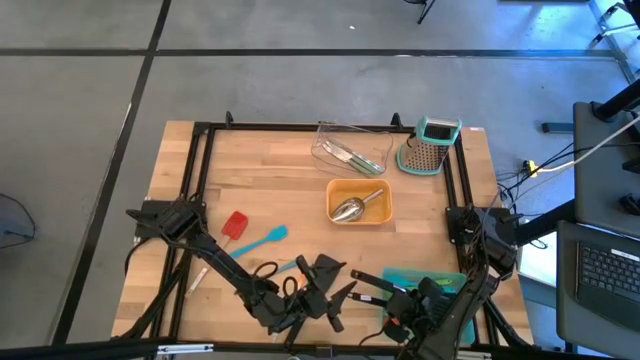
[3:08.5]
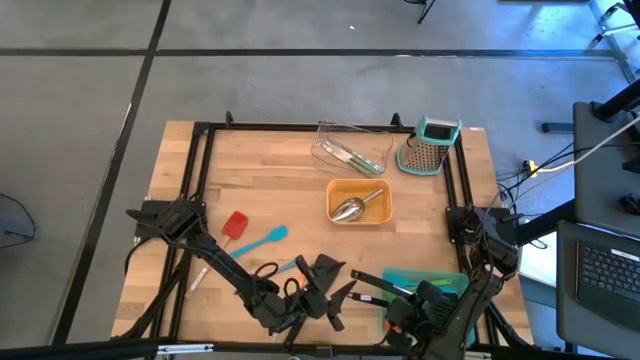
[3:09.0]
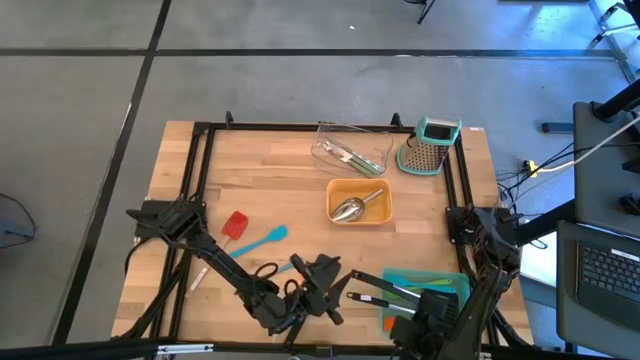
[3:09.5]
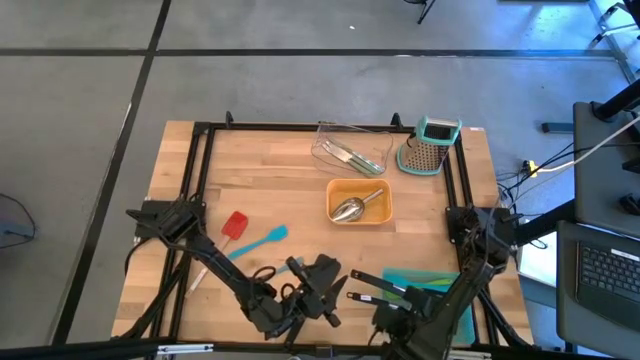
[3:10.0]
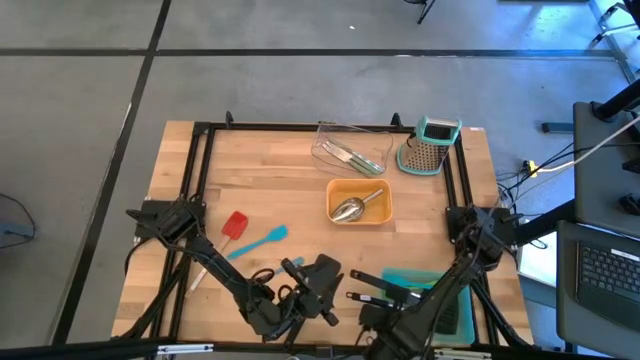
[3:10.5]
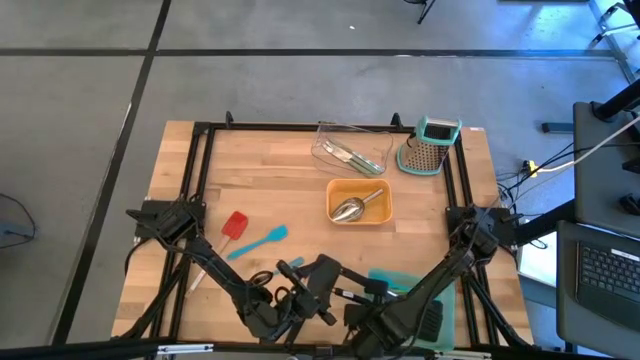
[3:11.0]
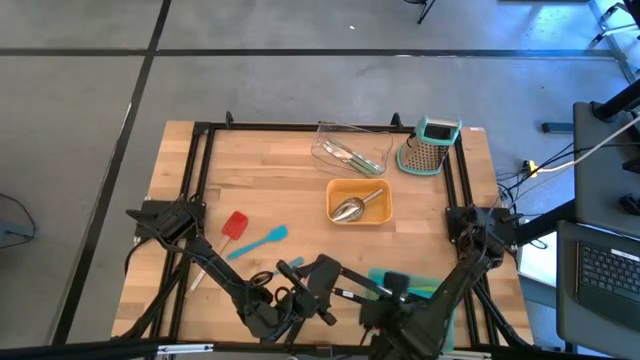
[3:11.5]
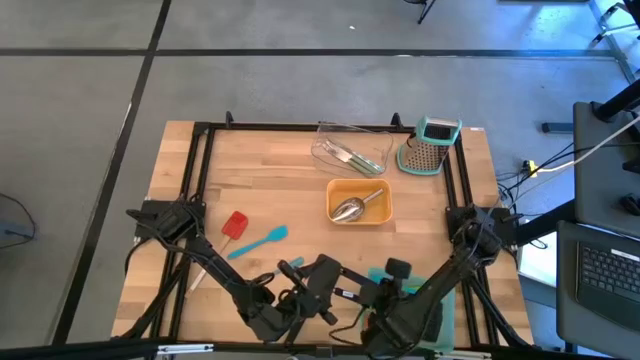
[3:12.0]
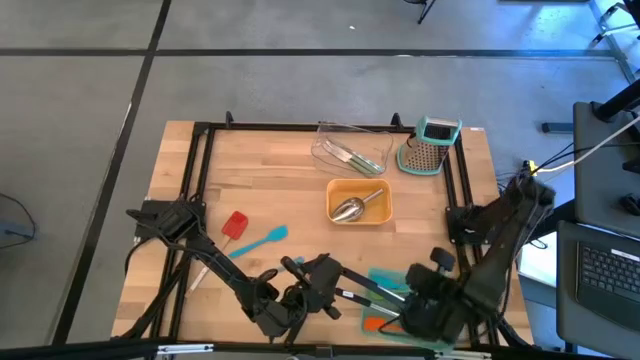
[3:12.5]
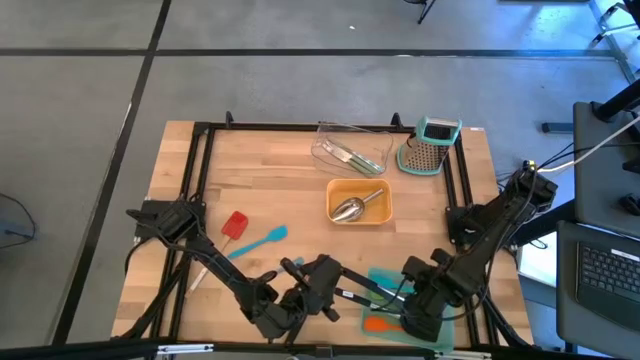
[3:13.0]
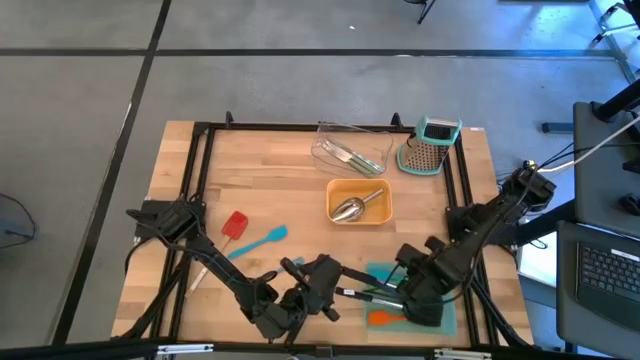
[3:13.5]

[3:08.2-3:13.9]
Task: Pick & Place Kitchen Items
Adjust the green bin

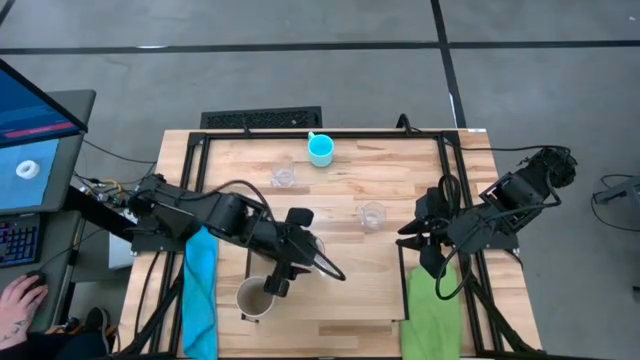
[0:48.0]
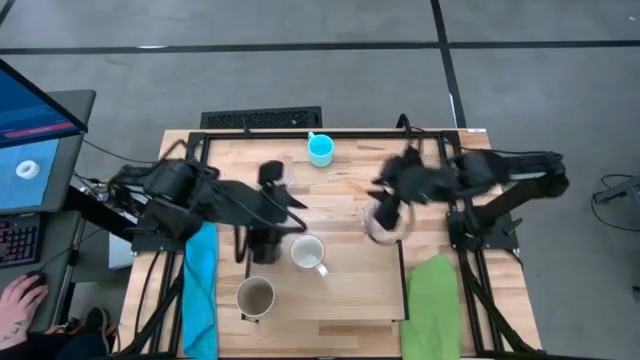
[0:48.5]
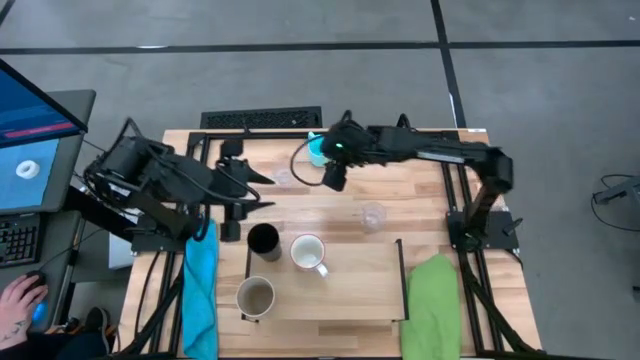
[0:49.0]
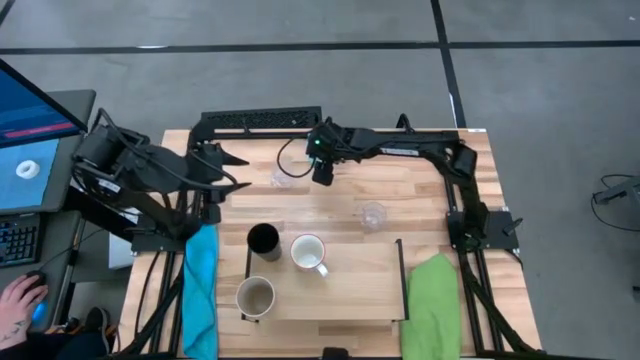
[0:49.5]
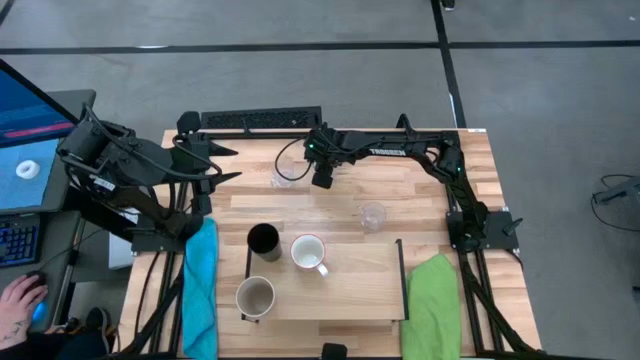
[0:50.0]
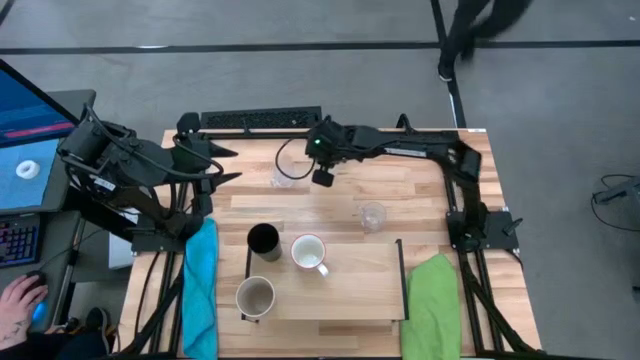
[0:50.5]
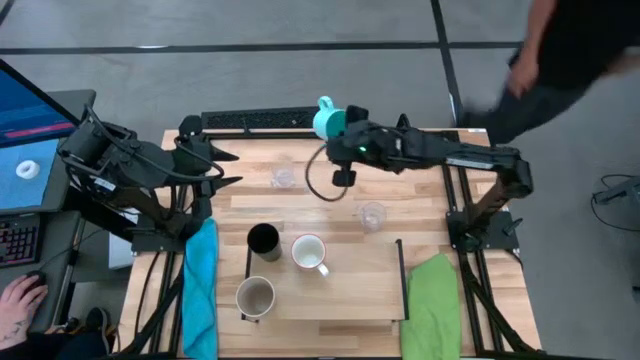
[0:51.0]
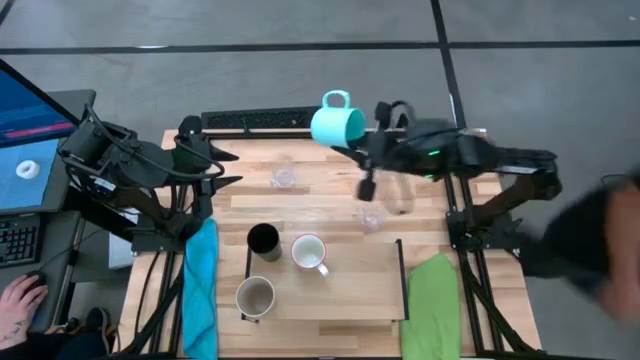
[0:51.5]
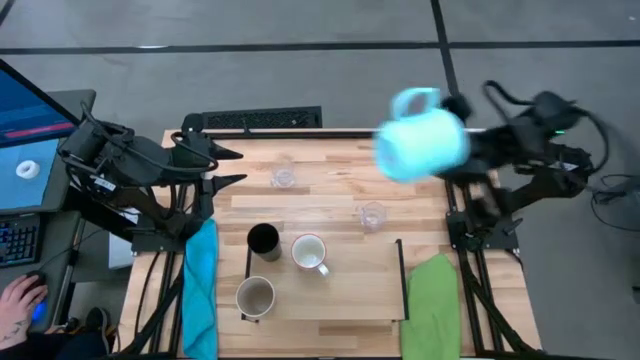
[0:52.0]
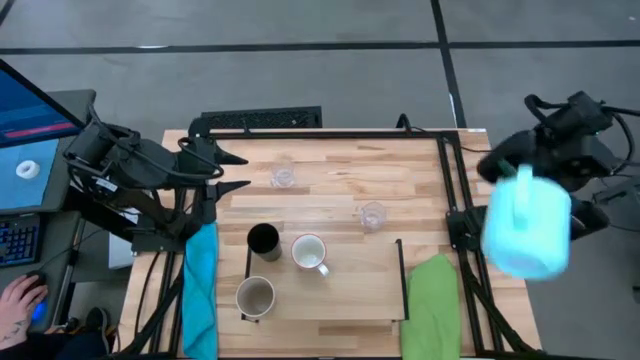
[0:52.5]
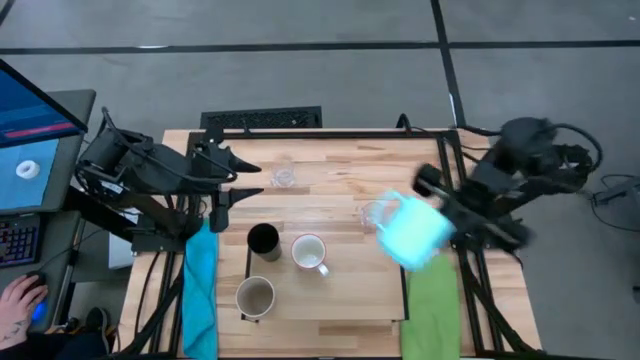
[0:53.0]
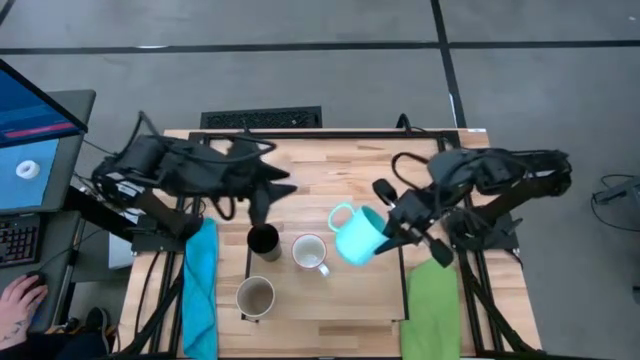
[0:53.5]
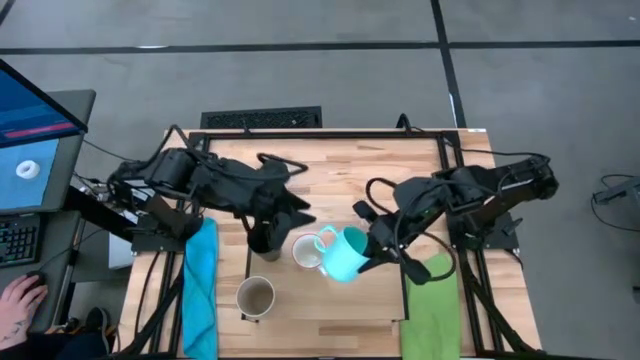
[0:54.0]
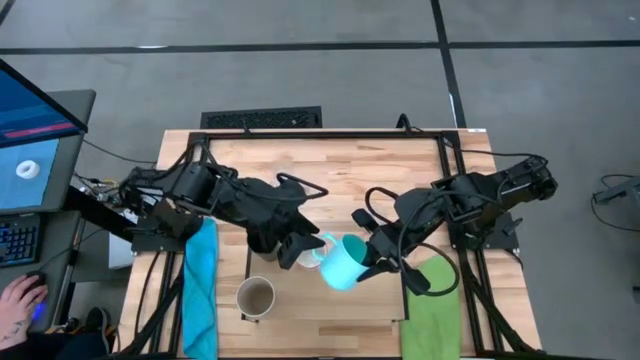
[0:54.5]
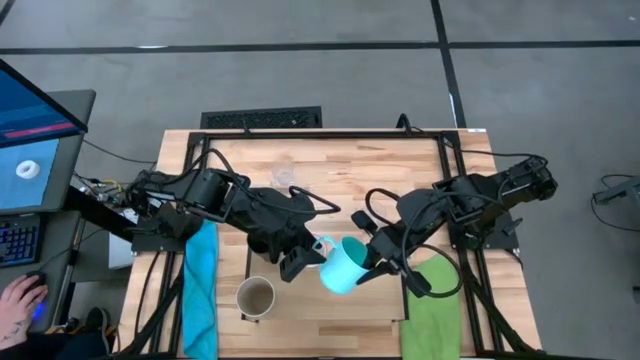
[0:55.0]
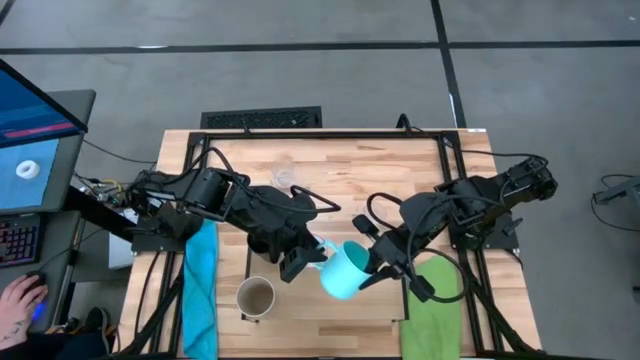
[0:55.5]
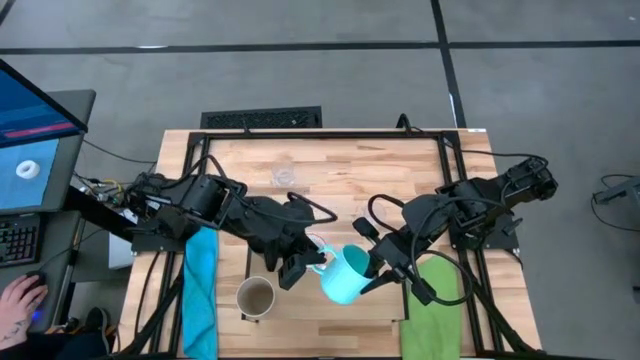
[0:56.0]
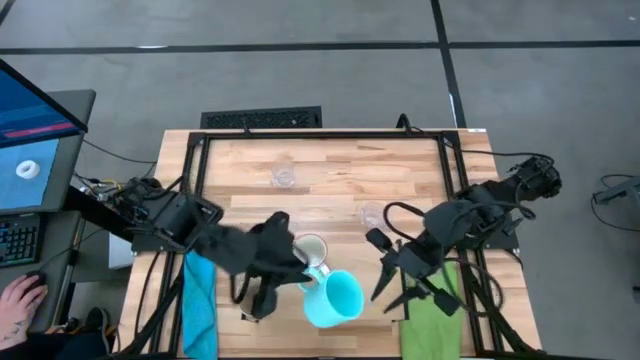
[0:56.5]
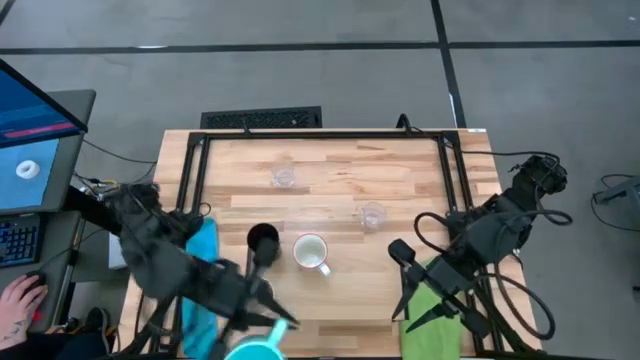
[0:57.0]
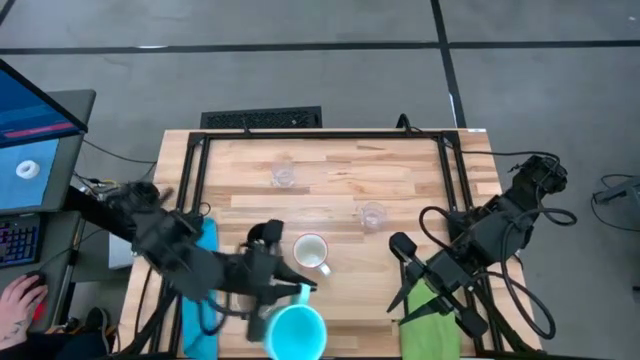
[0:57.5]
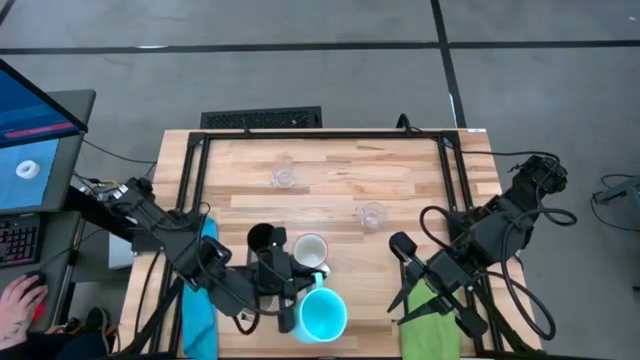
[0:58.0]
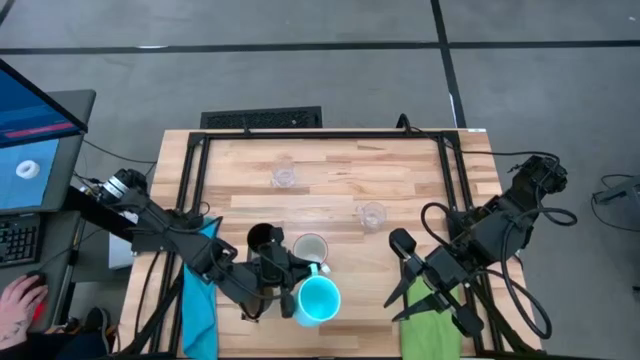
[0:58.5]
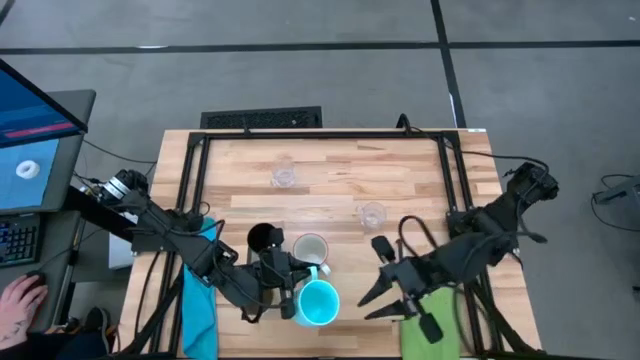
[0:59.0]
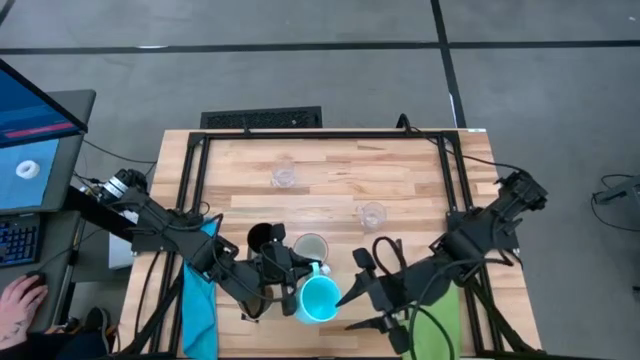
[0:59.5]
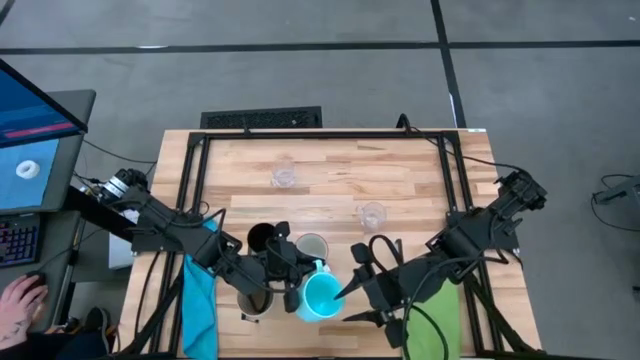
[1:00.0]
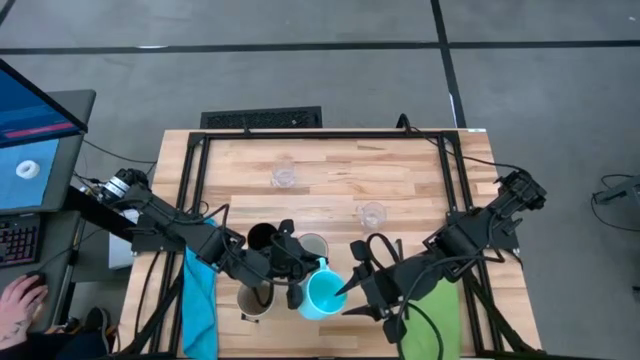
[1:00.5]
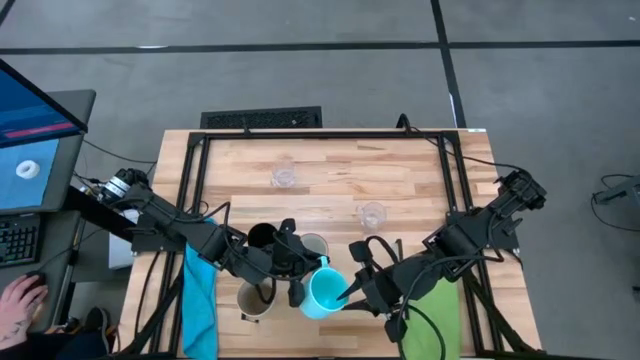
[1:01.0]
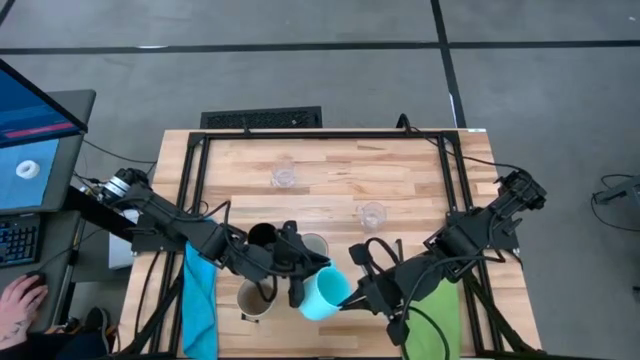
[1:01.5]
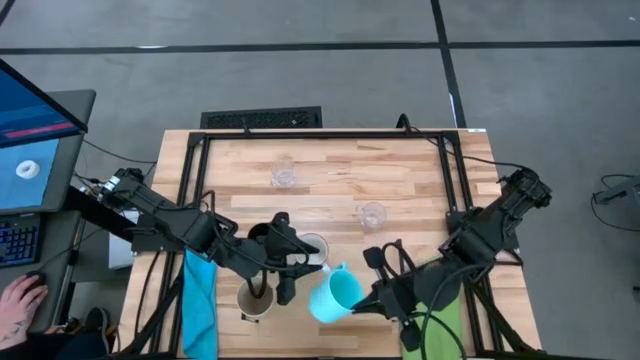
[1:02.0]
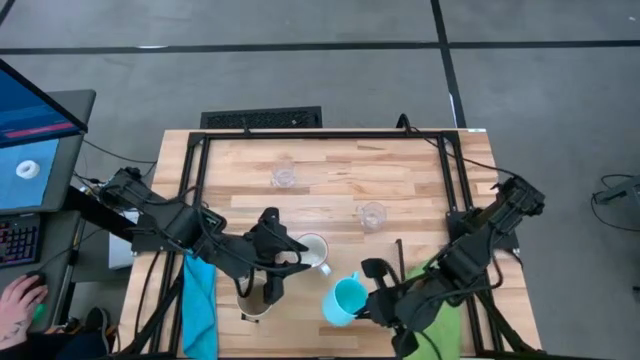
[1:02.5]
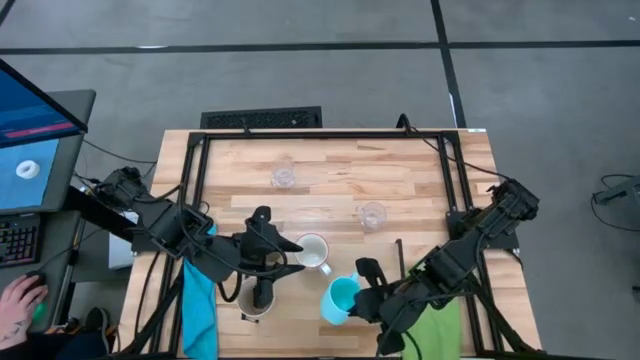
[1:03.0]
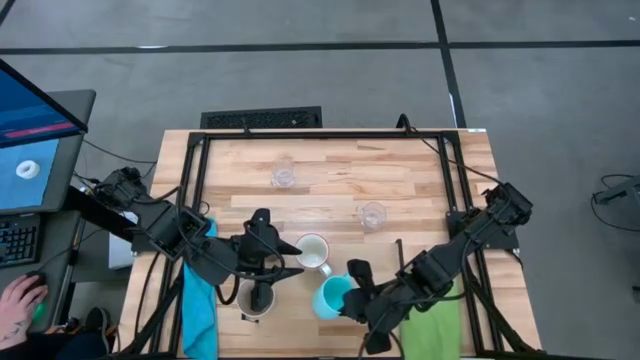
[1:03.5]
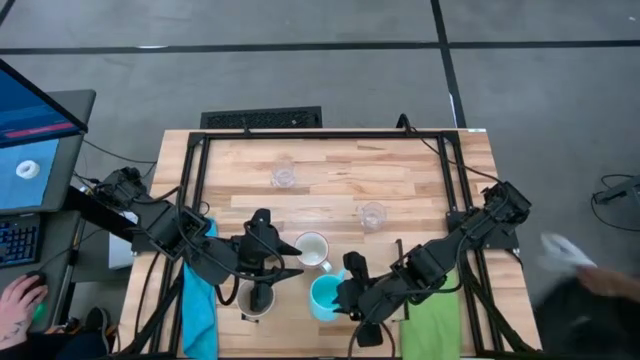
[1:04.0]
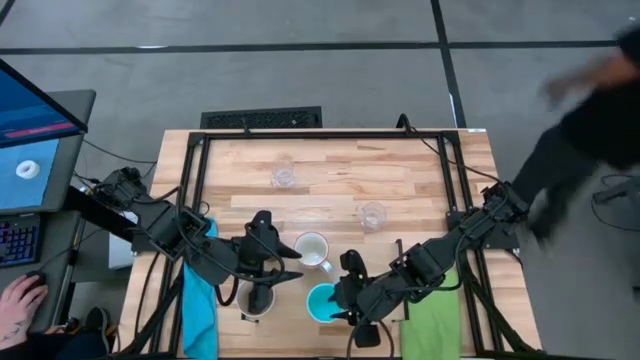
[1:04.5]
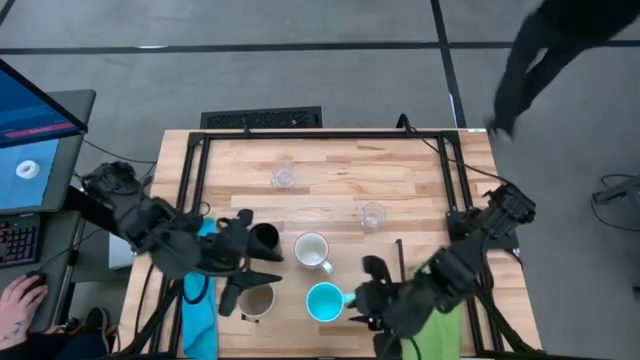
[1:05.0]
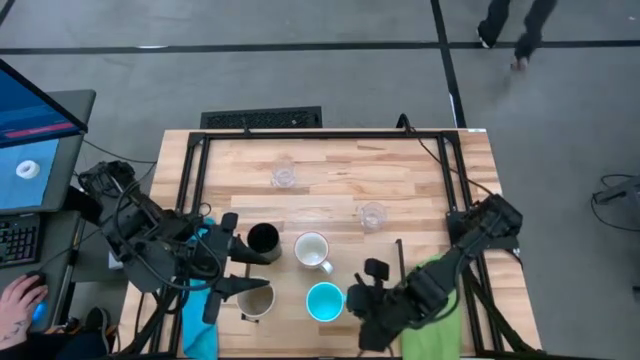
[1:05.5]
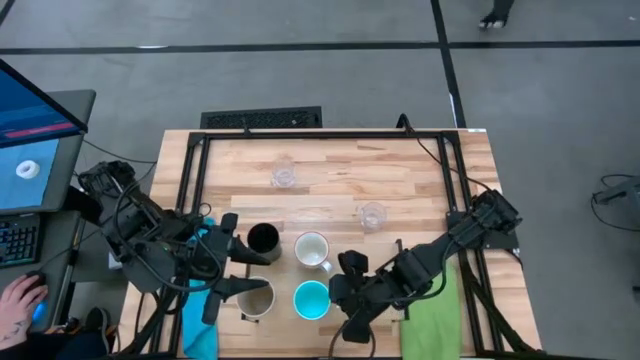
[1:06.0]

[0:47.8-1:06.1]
Task: Stack small to large cups/mugs on shelf
Put the blue mug on the shelf
